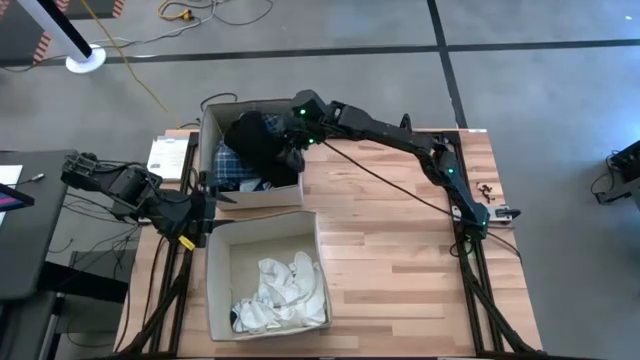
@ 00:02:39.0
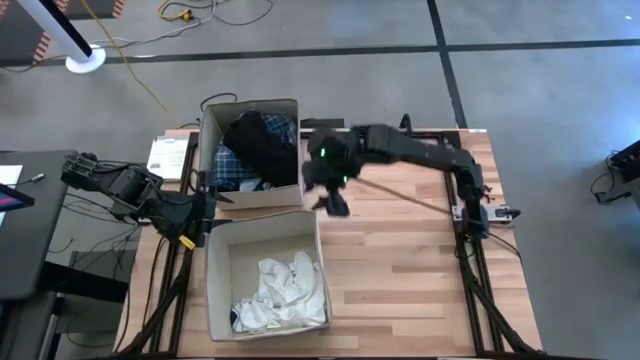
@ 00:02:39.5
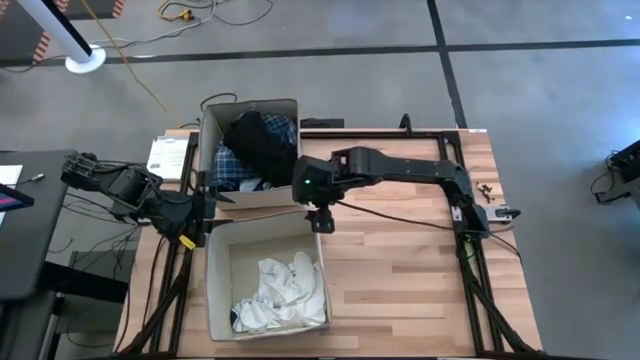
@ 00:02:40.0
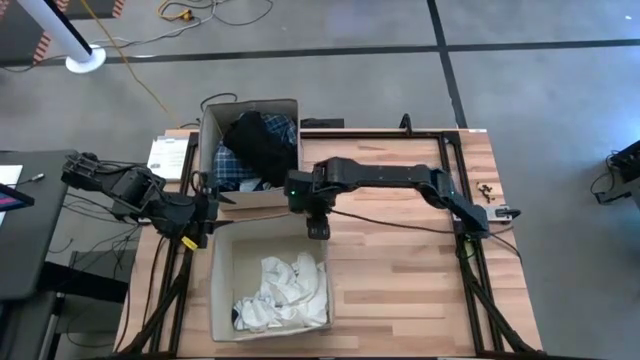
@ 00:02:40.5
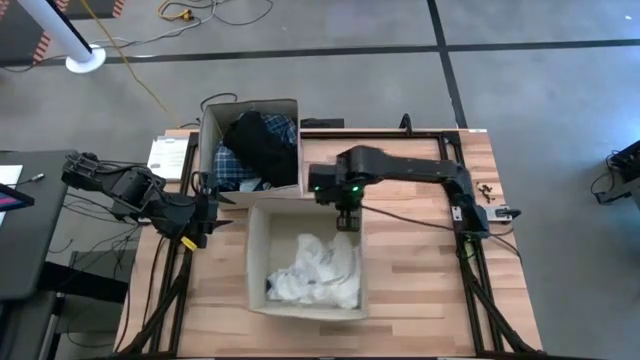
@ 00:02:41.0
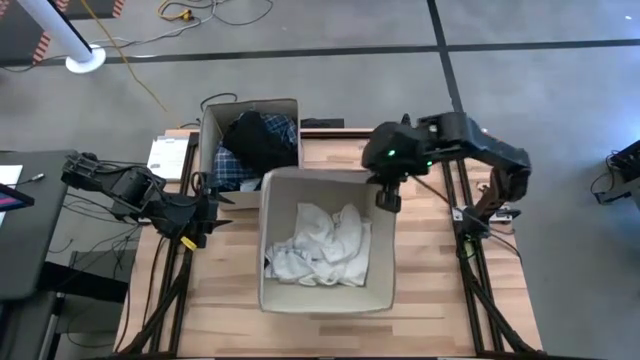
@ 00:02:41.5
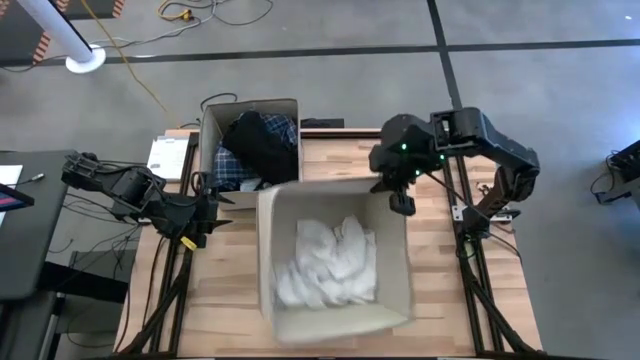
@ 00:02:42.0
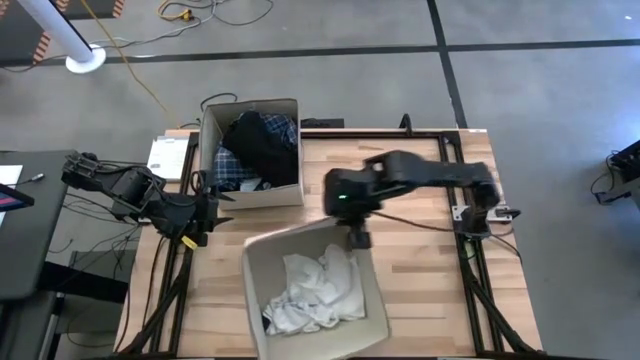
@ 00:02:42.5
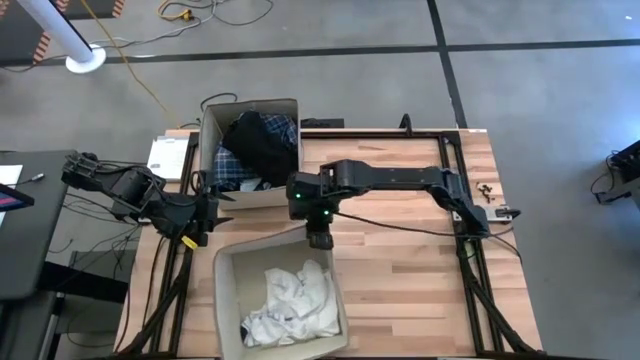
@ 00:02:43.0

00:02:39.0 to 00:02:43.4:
Task: Sort clothes
Adjust the bottom light brown laundry organizer

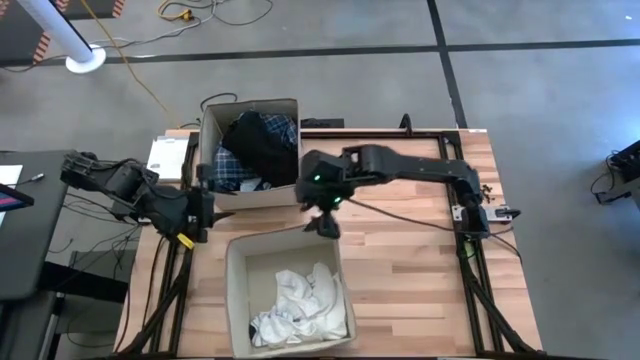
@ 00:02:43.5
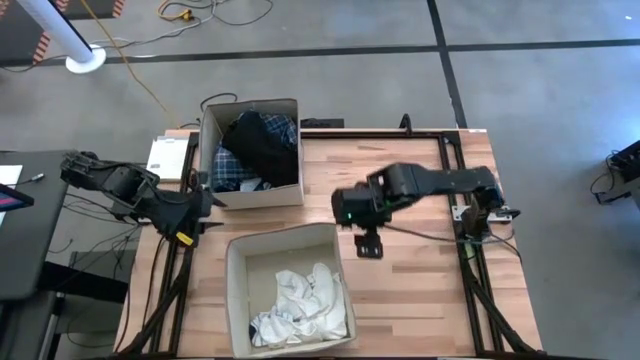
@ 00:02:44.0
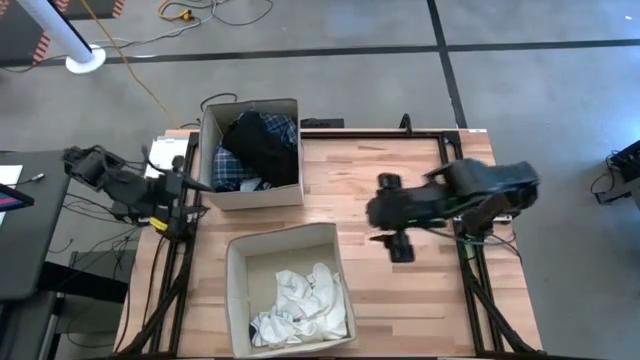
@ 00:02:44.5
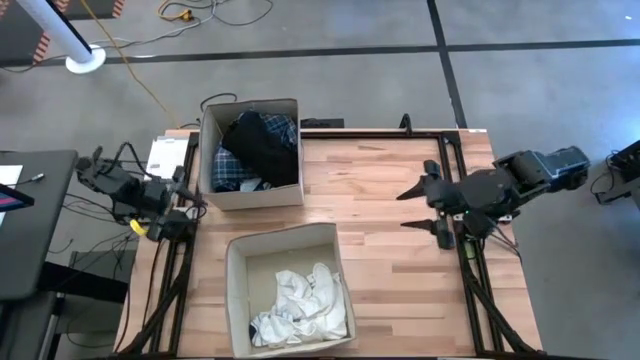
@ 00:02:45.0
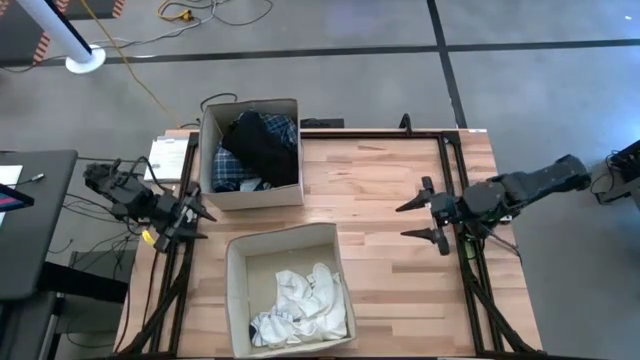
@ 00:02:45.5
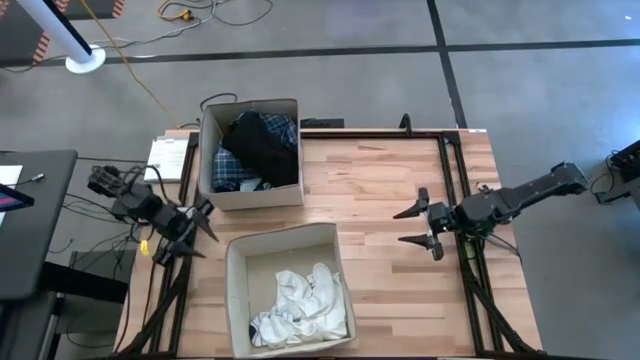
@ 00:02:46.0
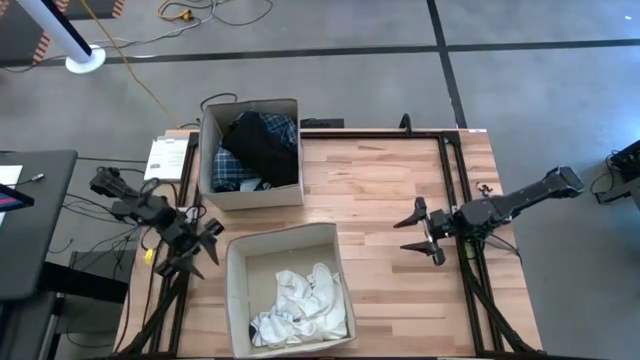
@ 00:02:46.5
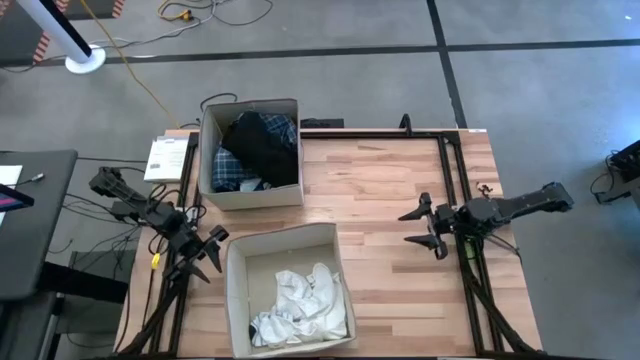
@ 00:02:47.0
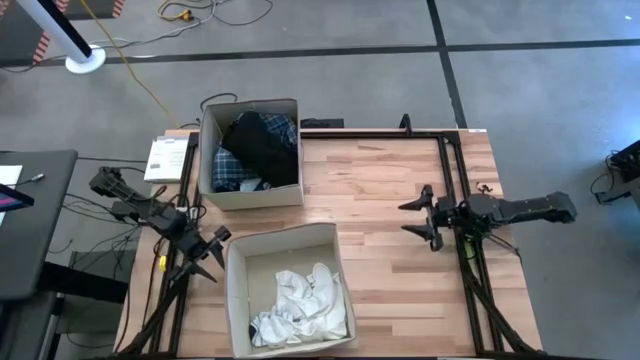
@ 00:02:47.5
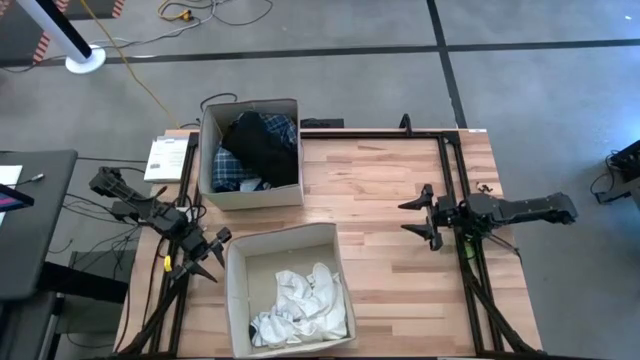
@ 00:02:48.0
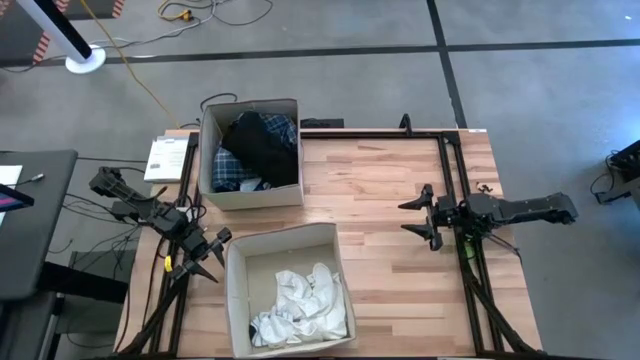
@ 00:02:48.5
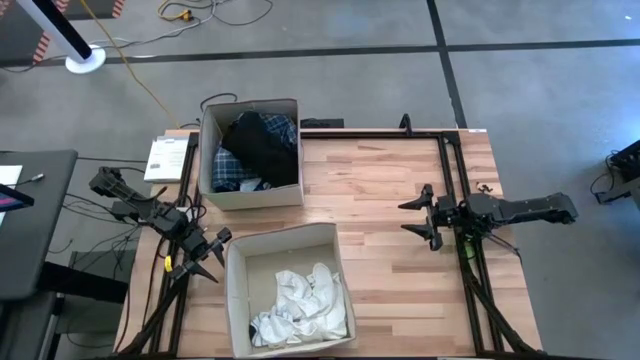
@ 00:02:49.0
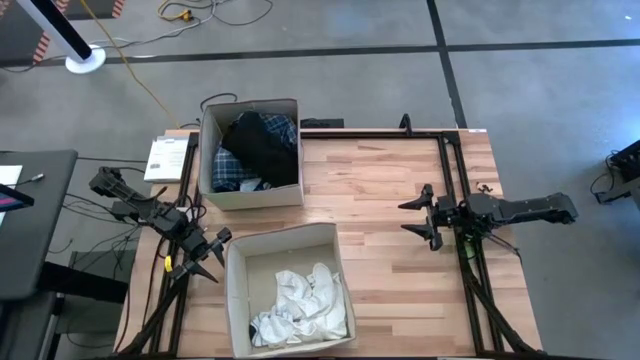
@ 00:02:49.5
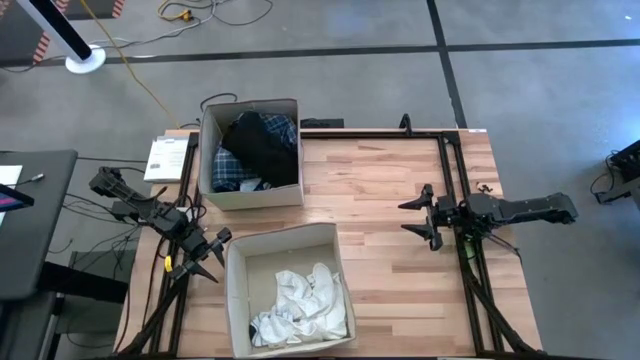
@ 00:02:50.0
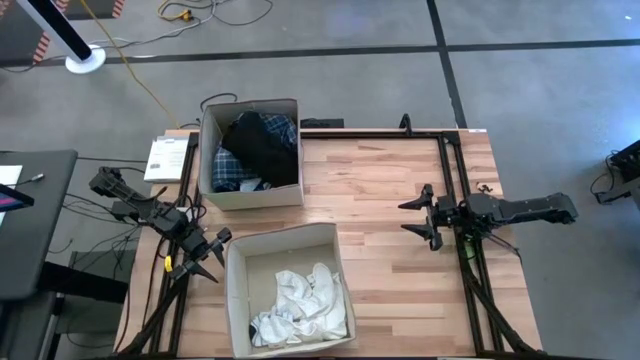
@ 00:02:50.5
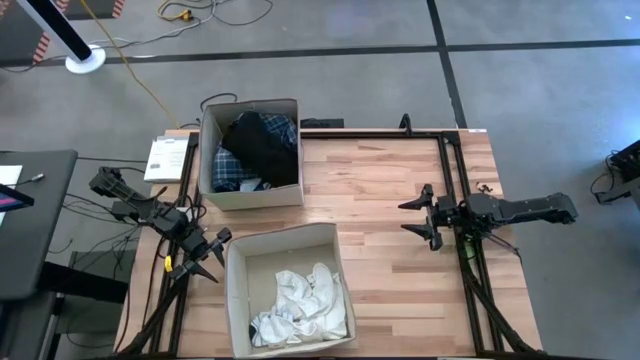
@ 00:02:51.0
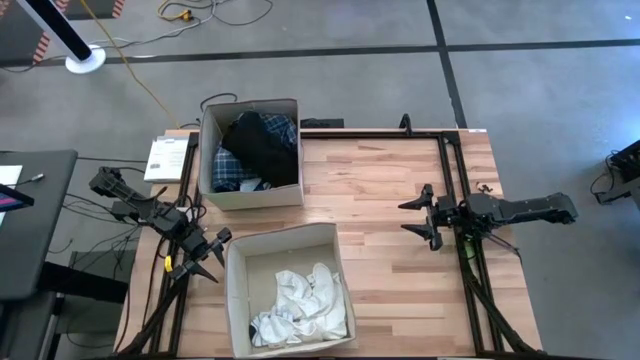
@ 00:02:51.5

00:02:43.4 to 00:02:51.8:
Return to Home Position

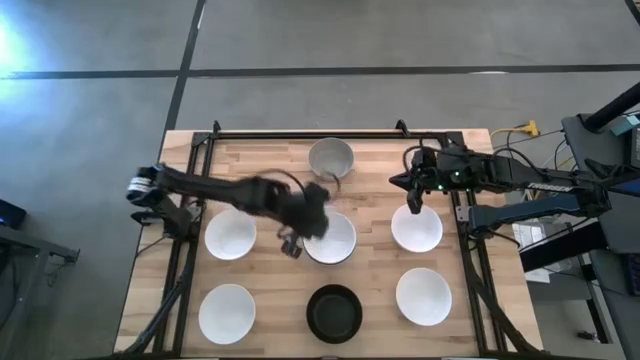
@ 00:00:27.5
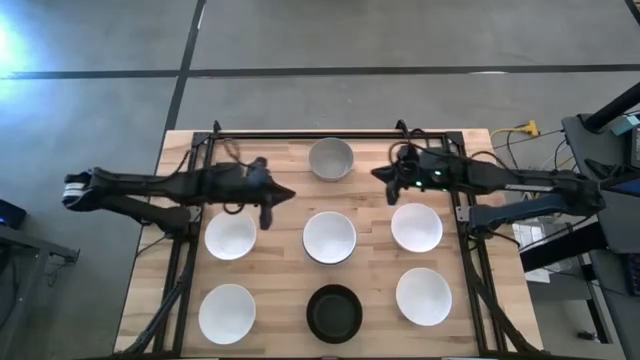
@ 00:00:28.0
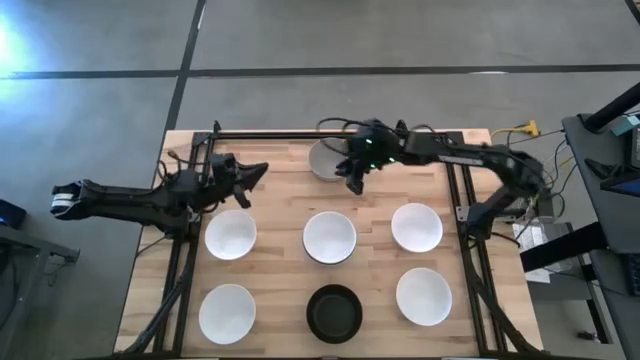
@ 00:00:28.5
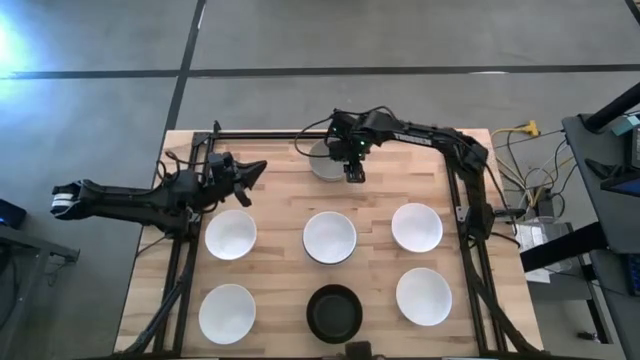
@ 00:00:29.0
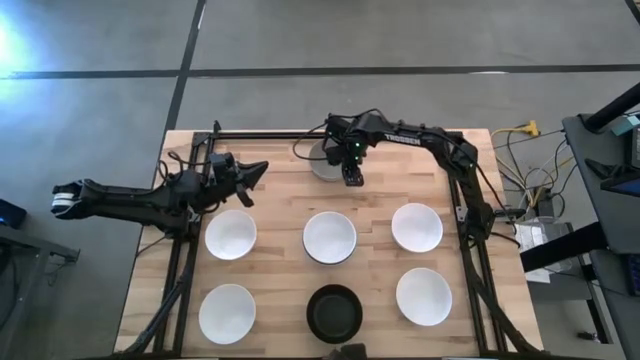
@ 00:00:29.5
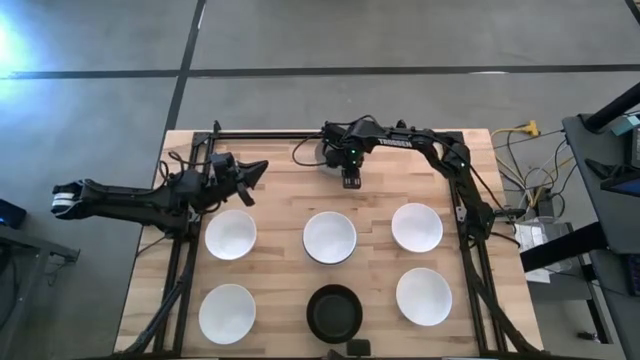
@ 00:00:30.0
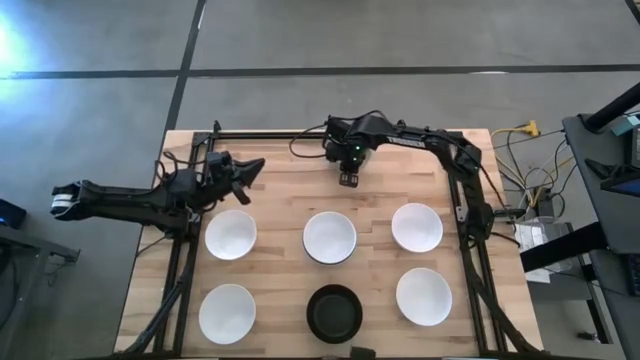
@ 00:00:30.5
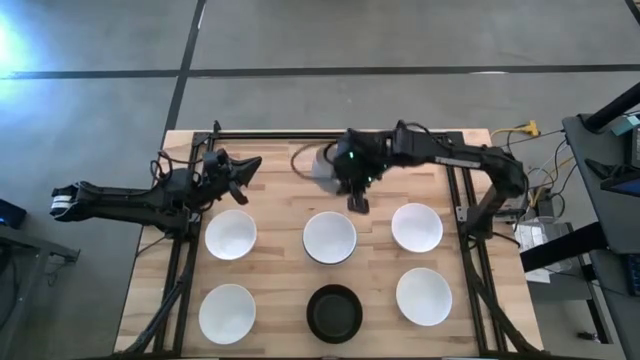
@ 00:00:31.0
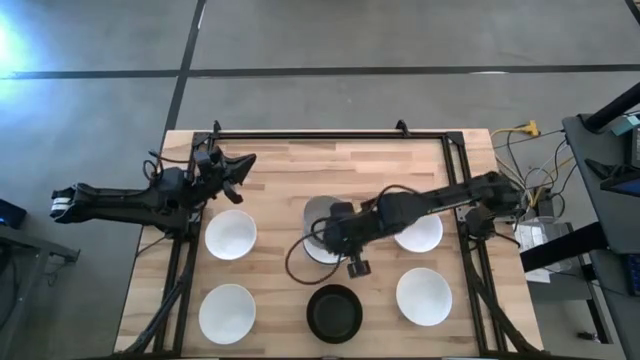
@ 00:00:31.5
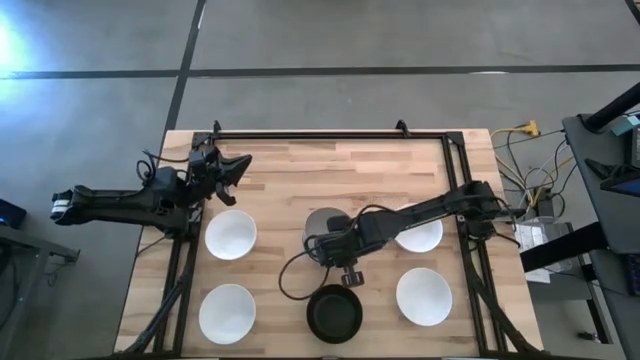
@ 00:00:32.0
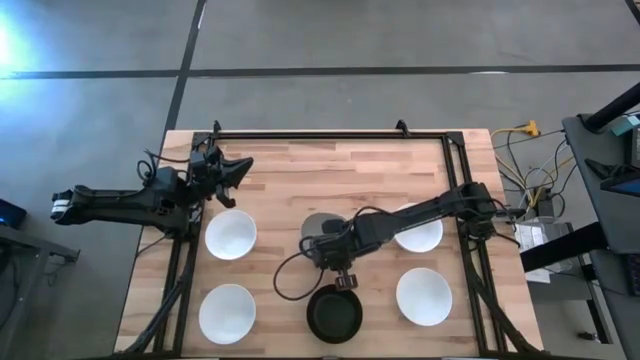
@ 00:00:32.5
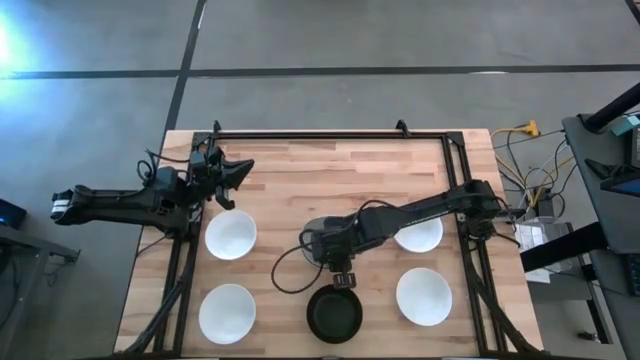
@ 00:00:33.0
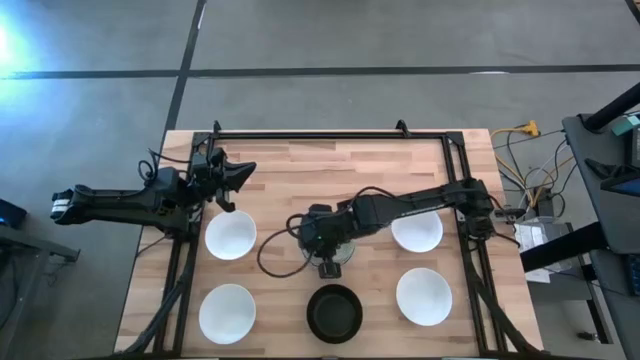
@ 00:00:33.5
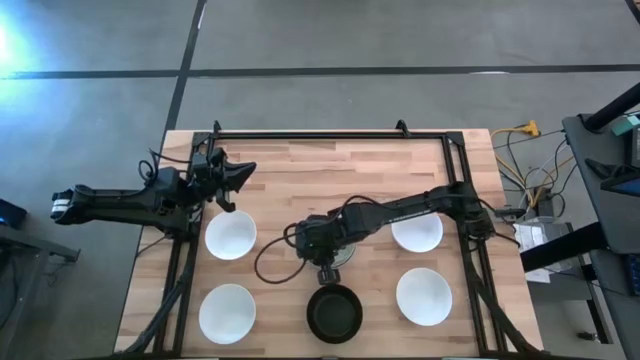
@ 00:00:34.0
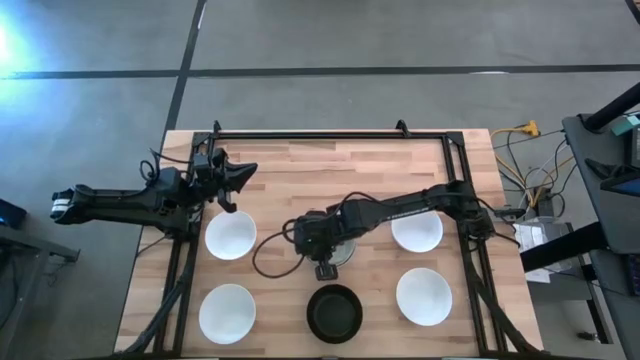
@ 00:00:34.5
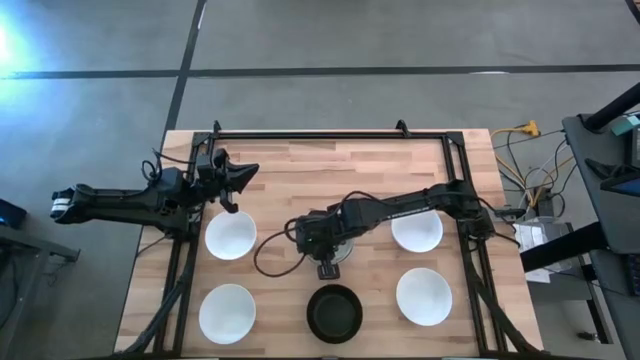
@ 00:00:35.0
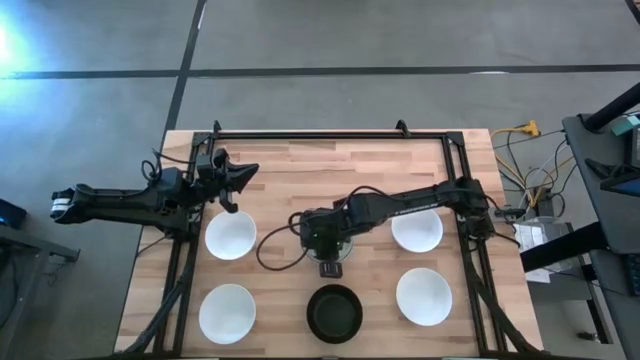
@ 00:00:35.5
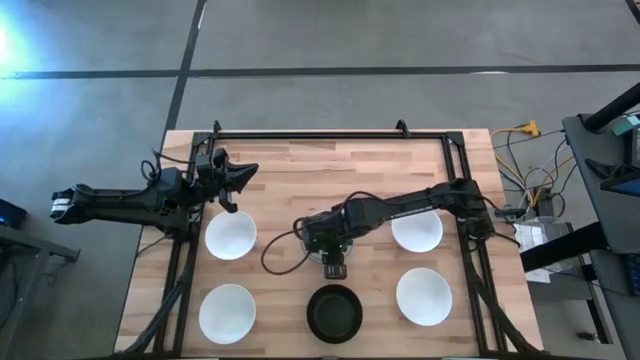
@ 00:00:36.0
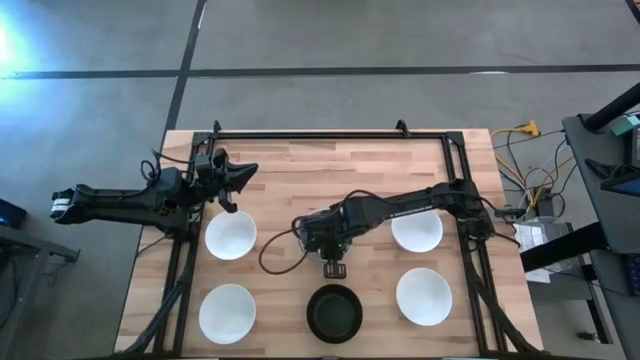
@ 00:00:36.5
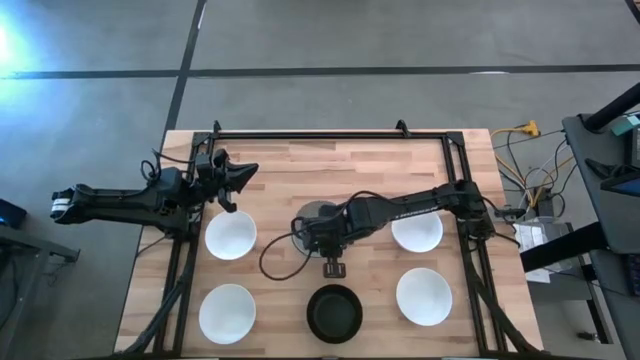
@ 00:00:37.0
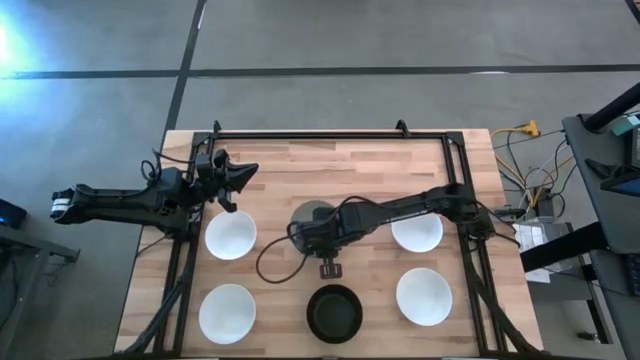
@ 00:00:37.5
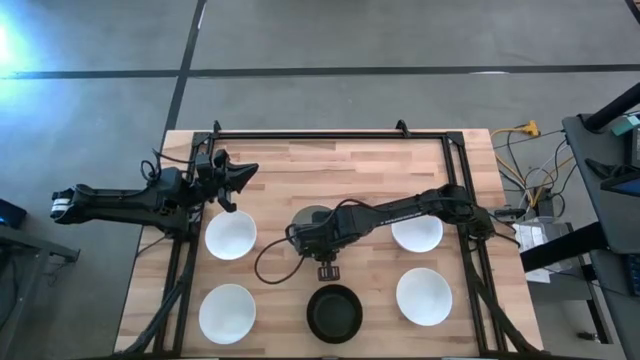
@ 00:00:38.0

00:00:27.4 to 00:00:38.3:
Task: Nest bowls inside each other
Stack the light gray bowl on top of the white bowl
